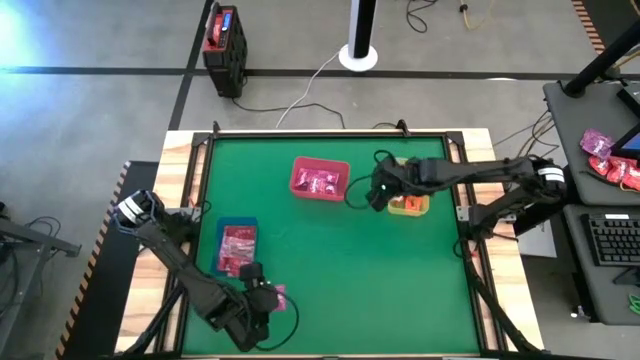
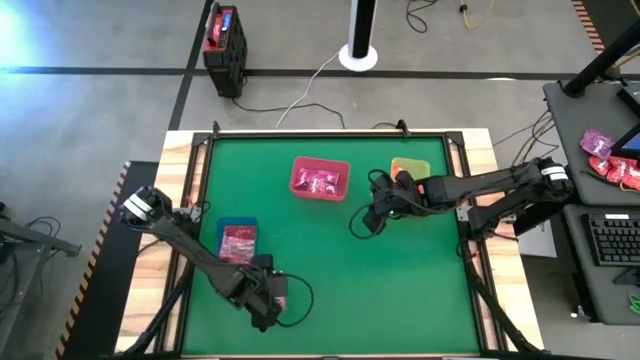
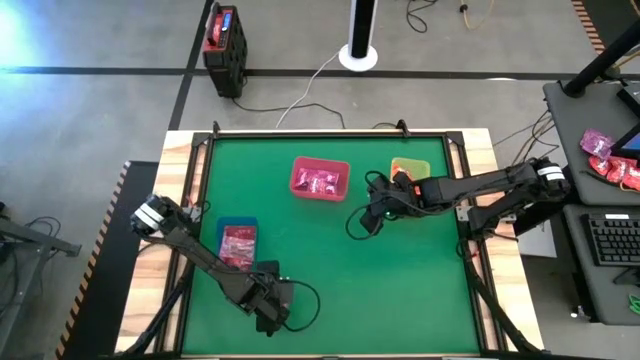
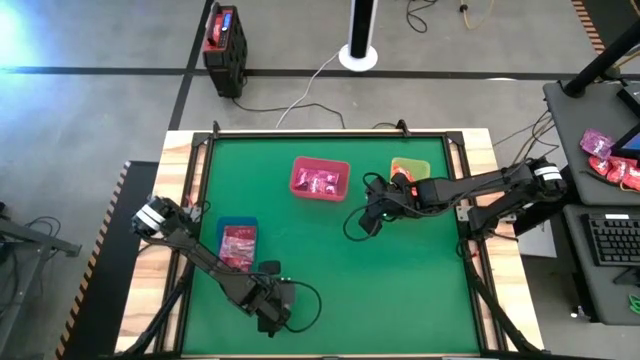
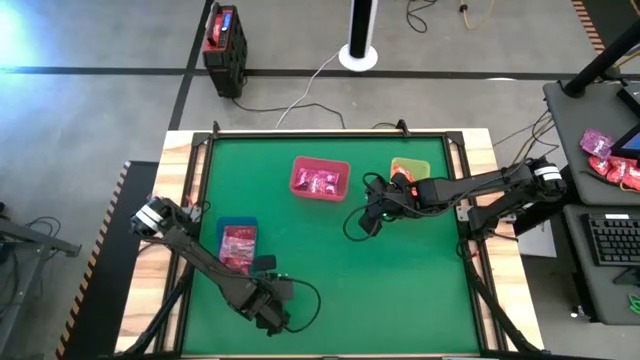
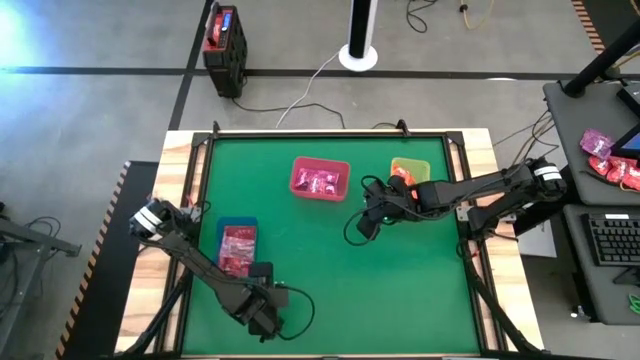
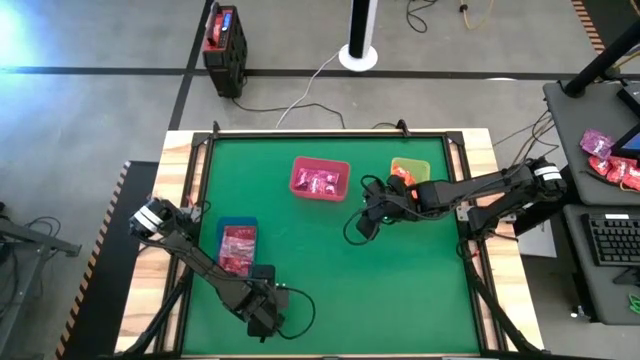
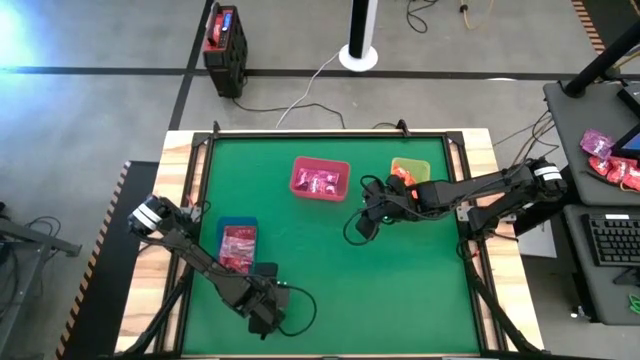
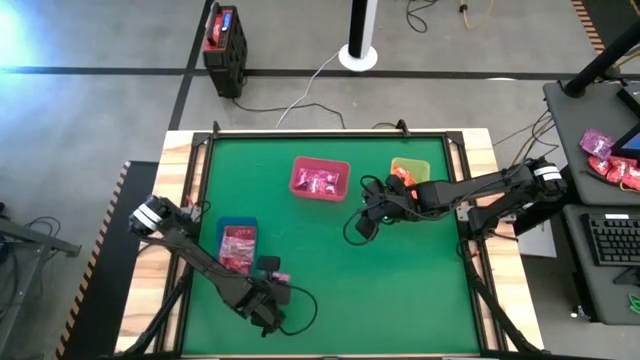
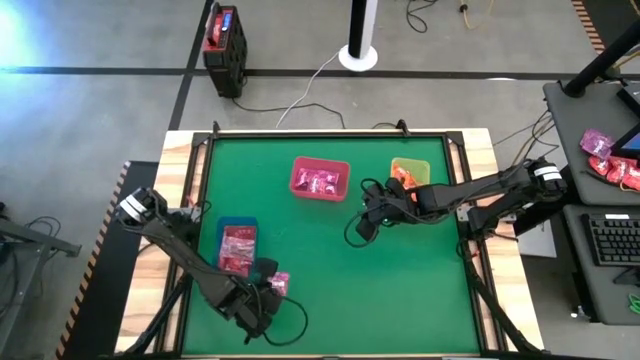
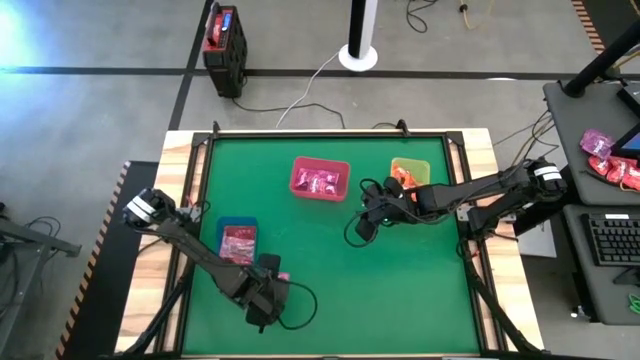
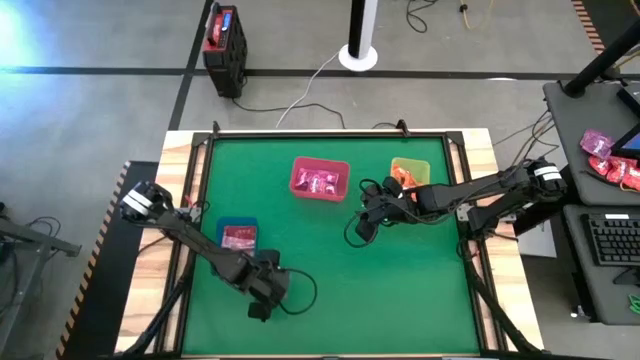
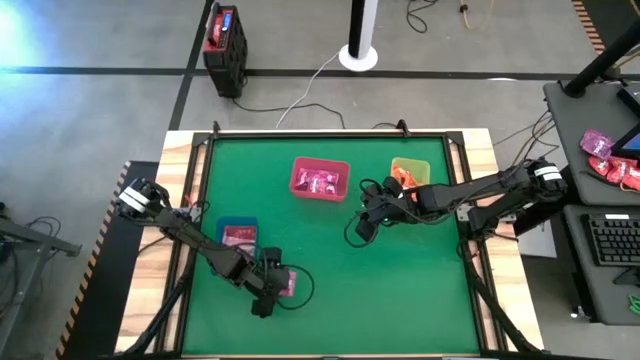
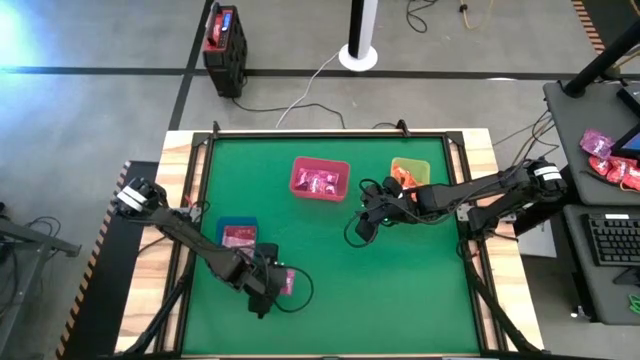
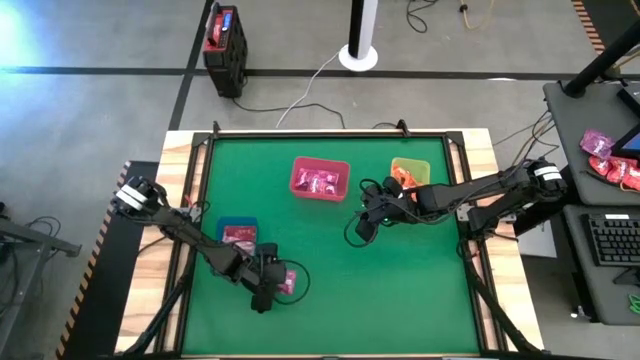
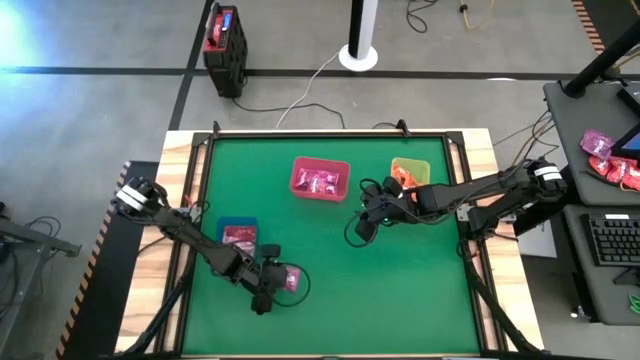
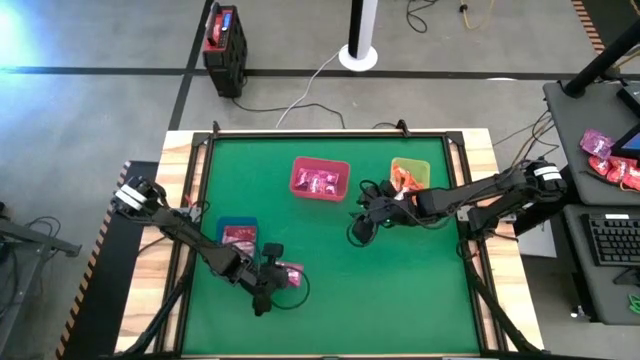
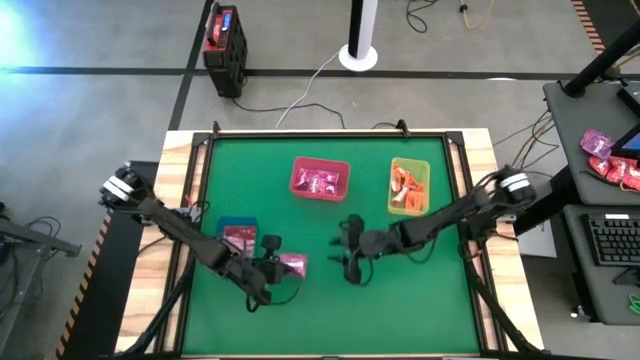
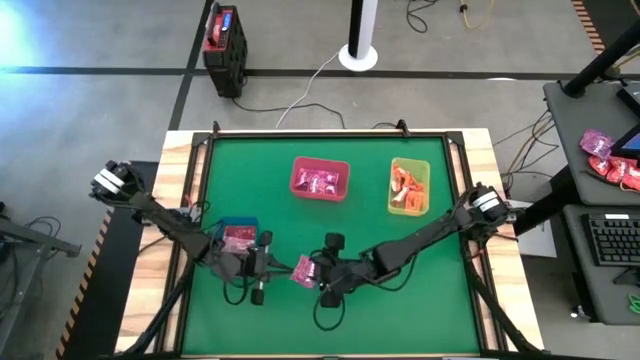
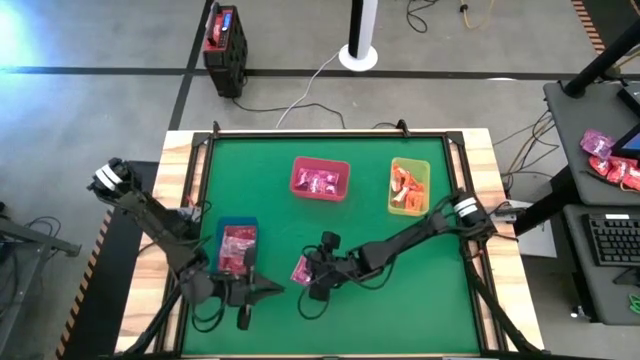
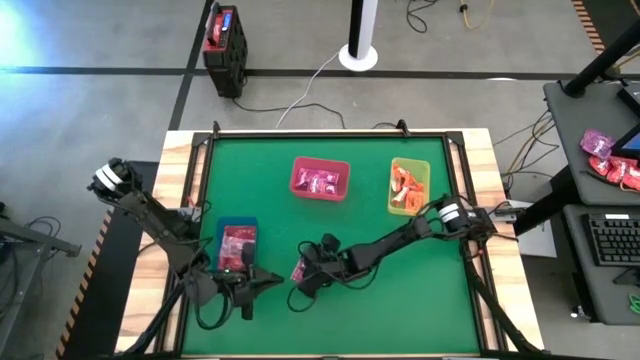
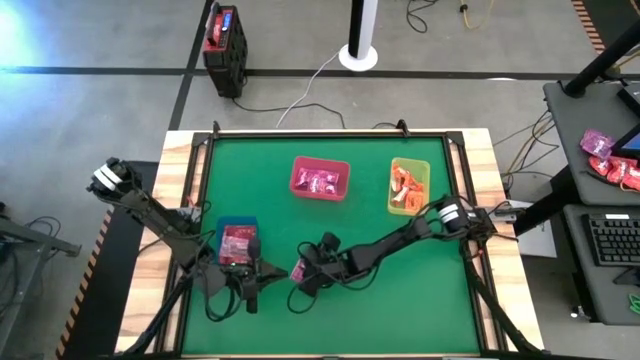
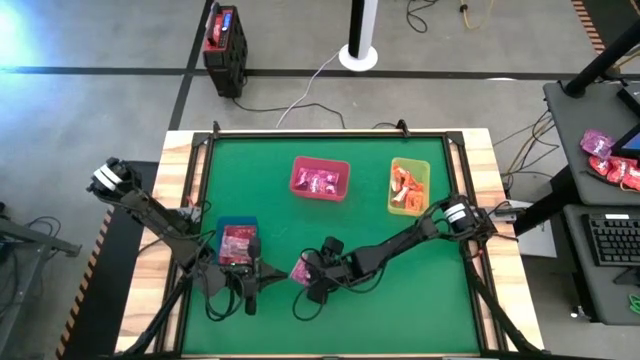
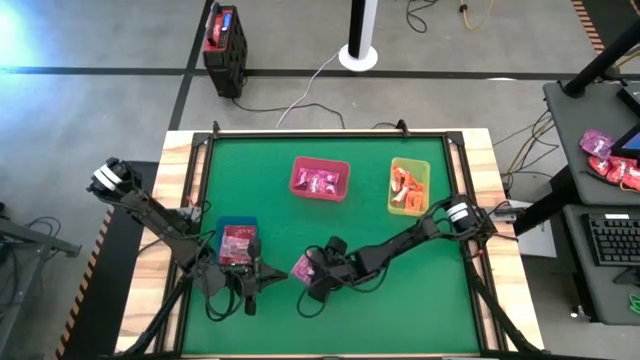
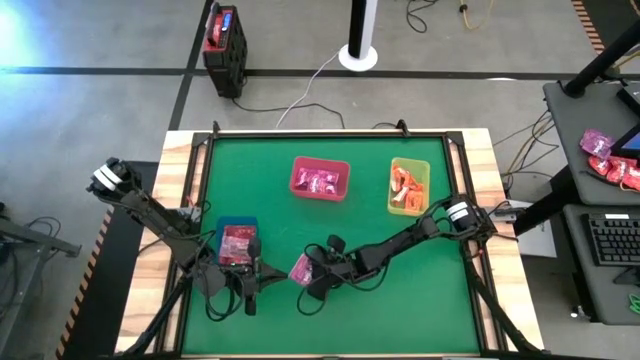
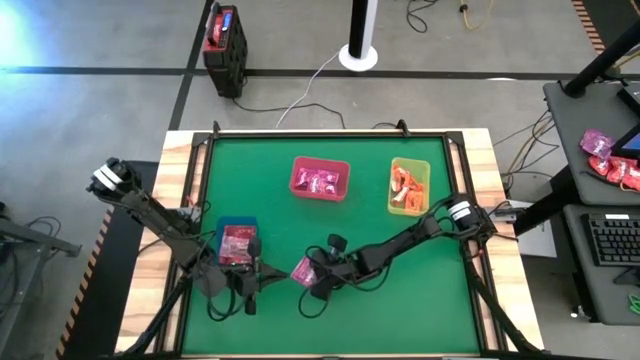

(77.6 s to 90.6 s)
Task: Sort candy by brand, put in halloween buckets
Put the violet candy into the red bin

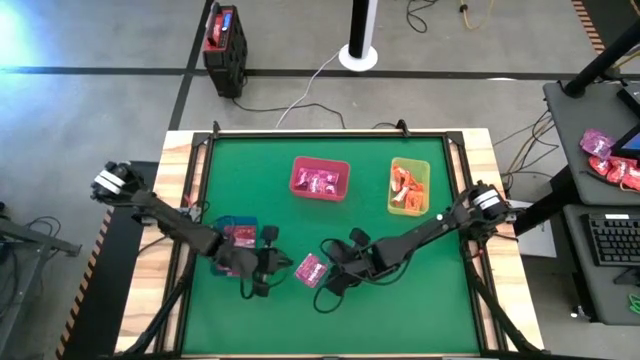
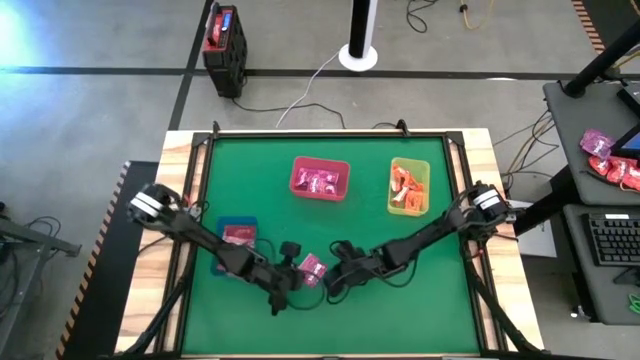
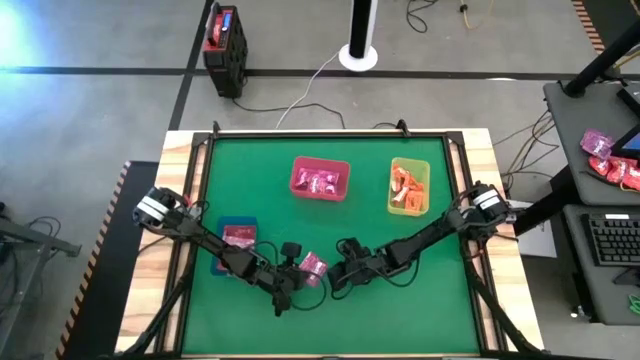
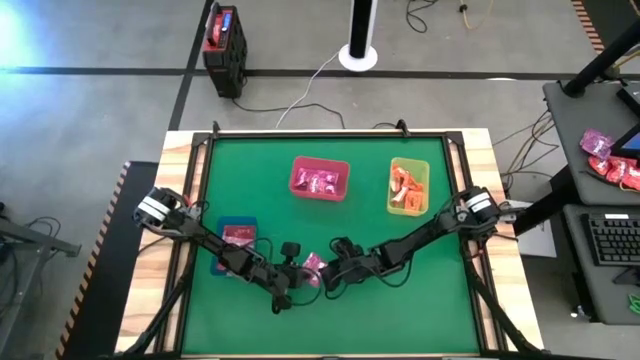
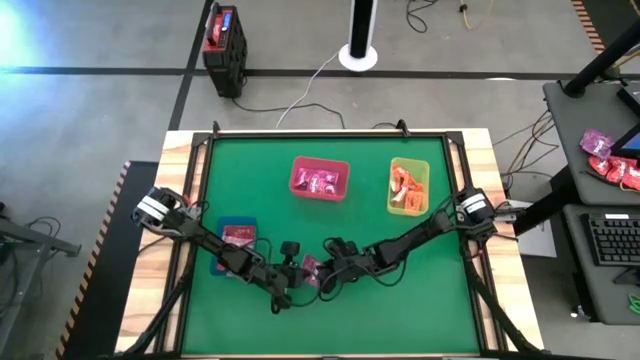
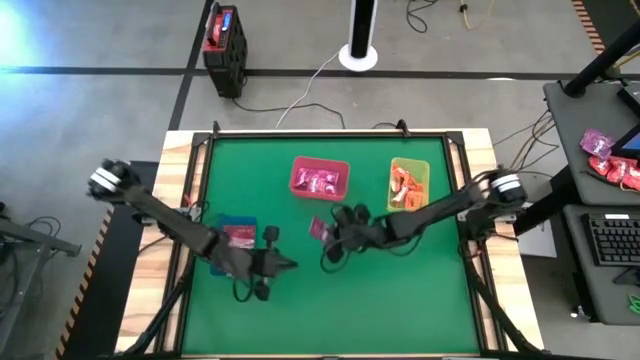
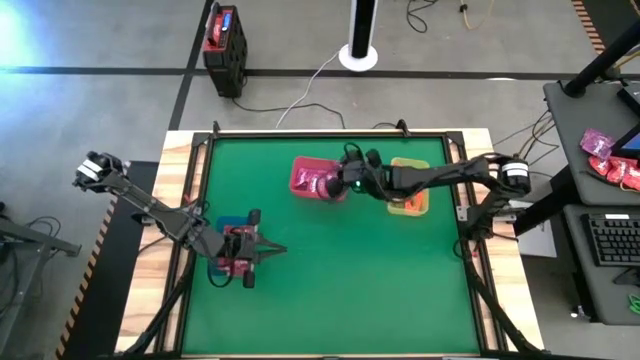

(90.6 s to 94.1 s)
Put the violet candy into the red bin

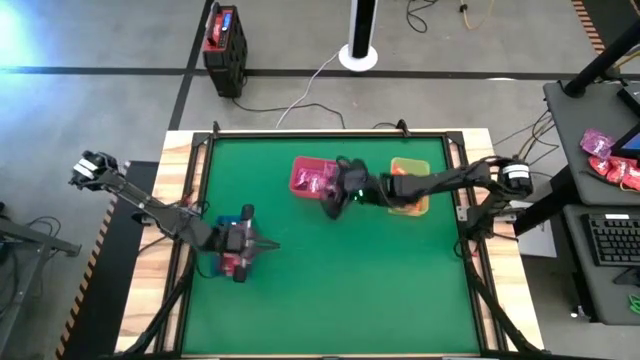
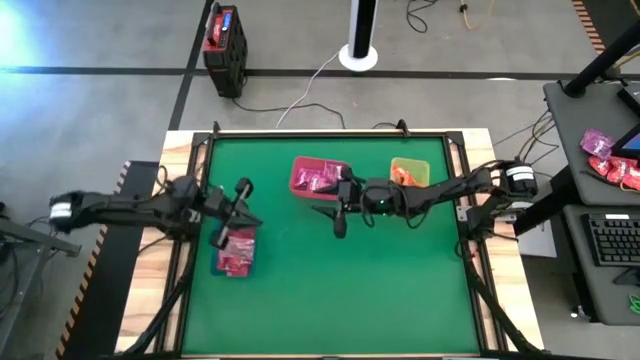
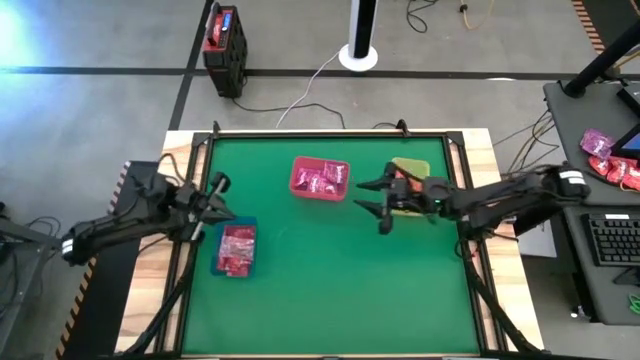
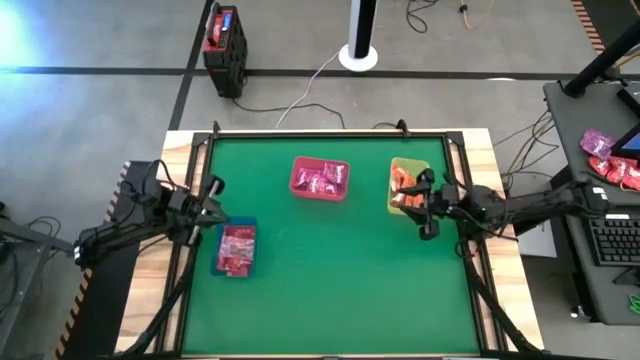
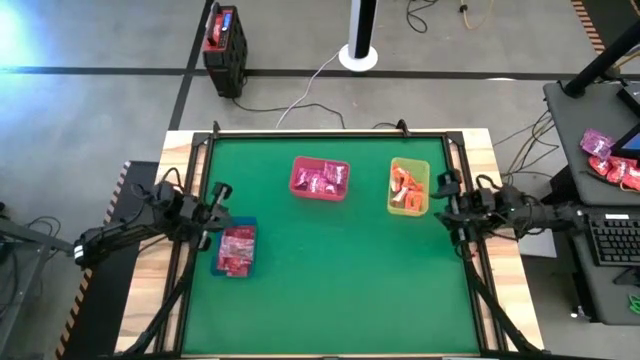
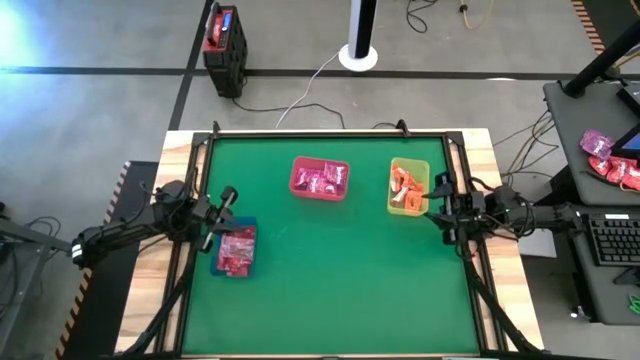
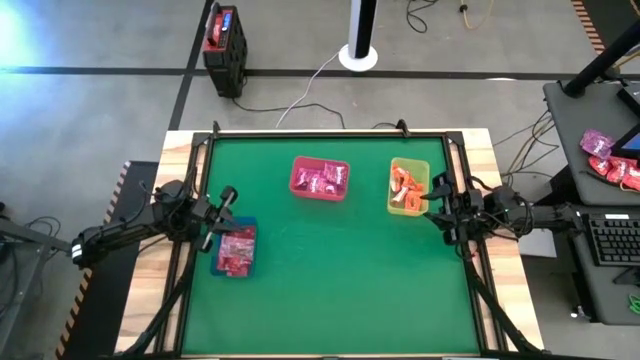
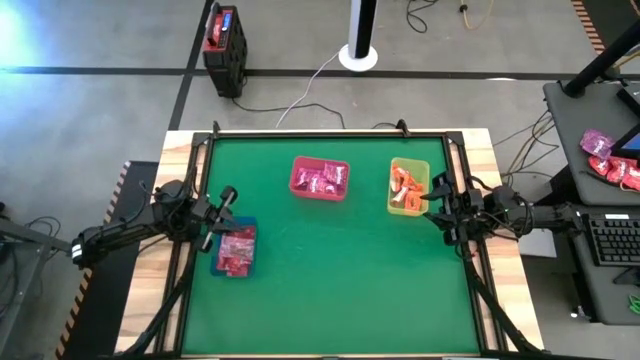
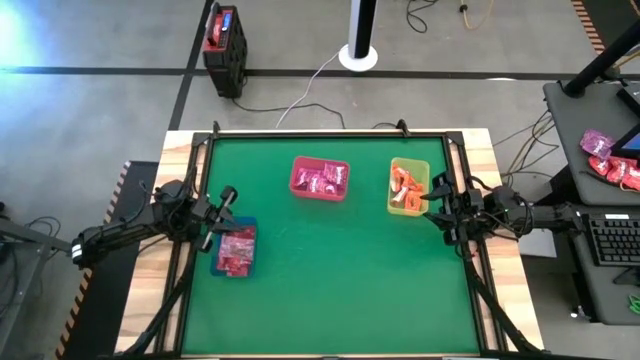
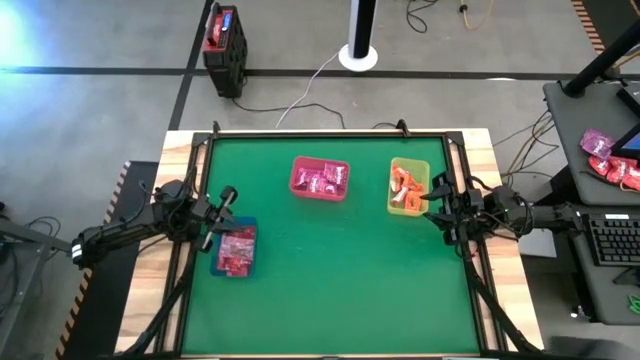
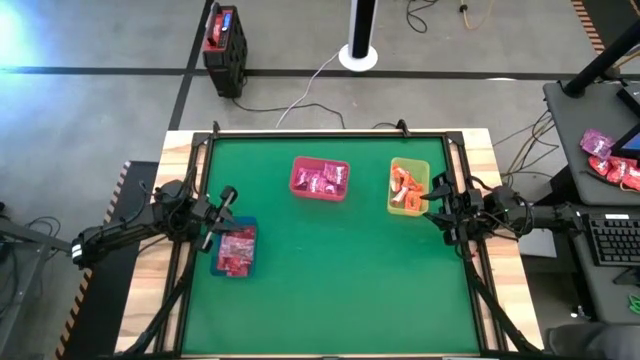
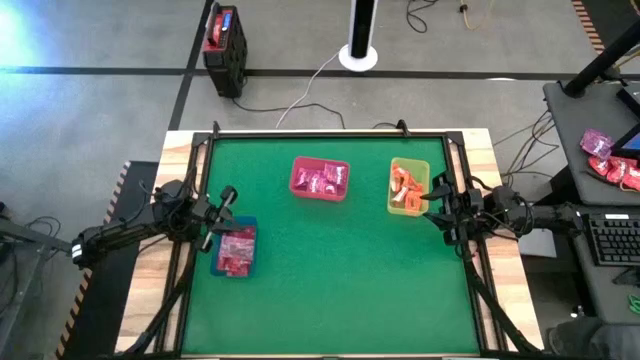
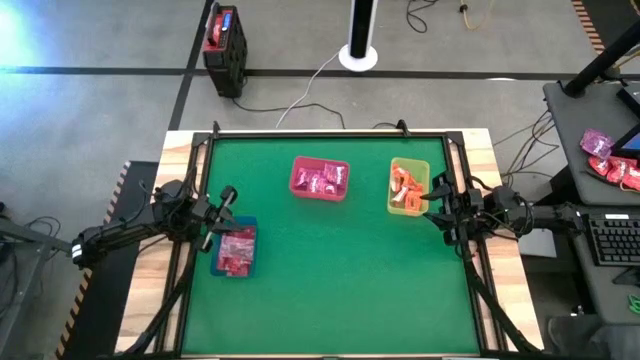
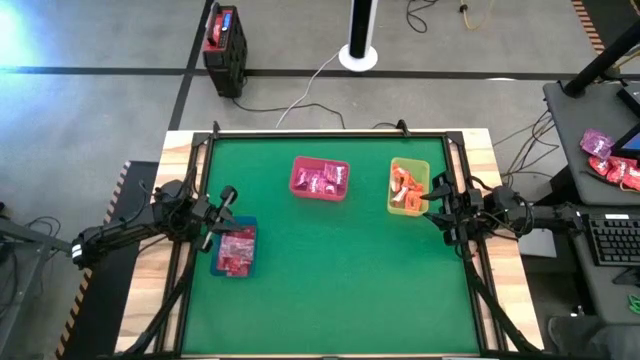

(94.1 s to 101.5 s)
Return to Home Position
